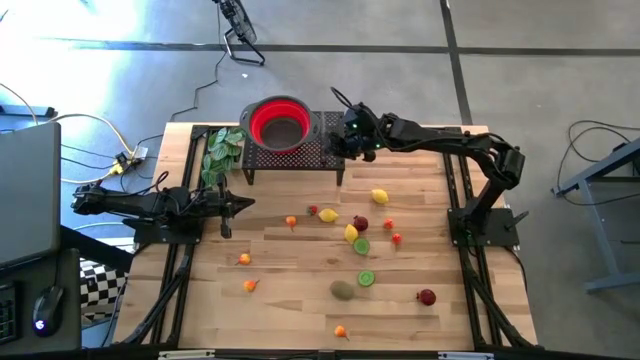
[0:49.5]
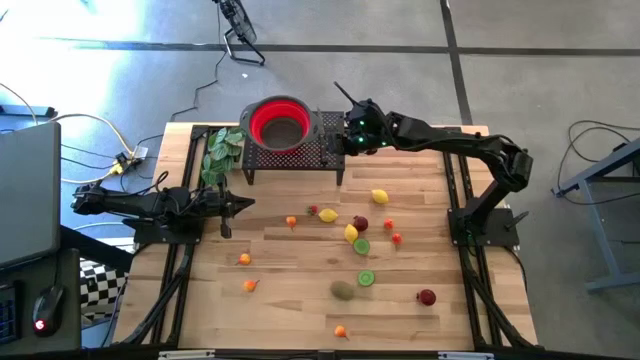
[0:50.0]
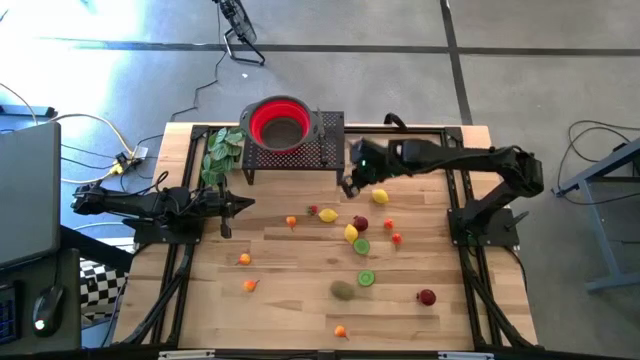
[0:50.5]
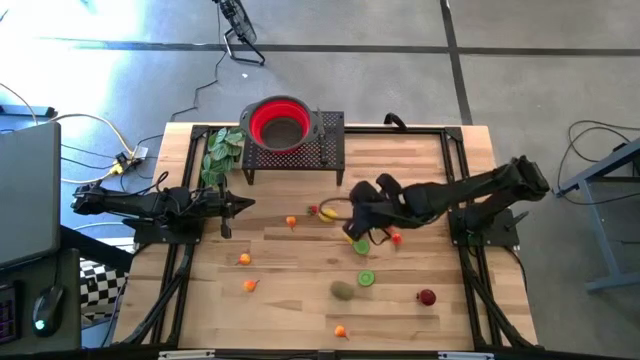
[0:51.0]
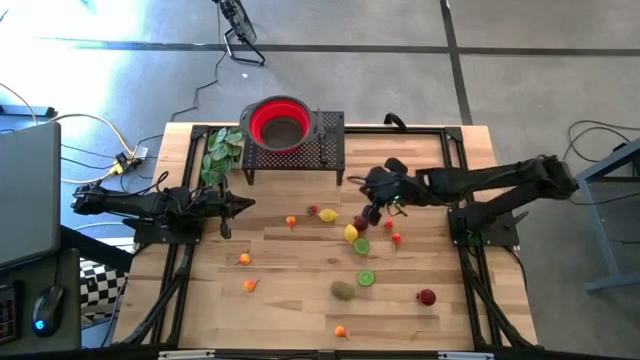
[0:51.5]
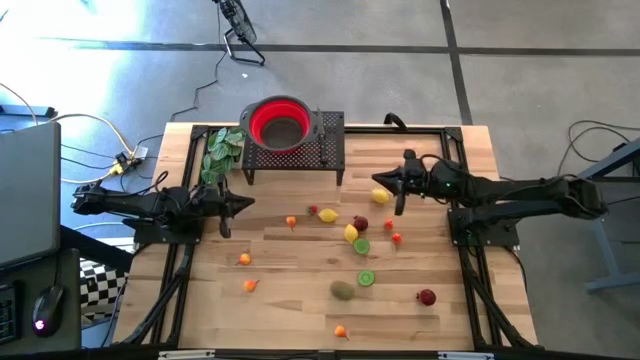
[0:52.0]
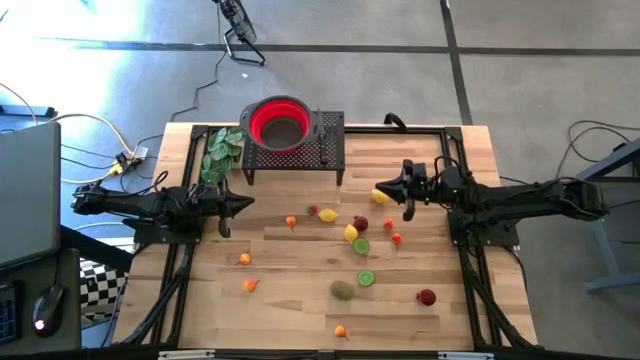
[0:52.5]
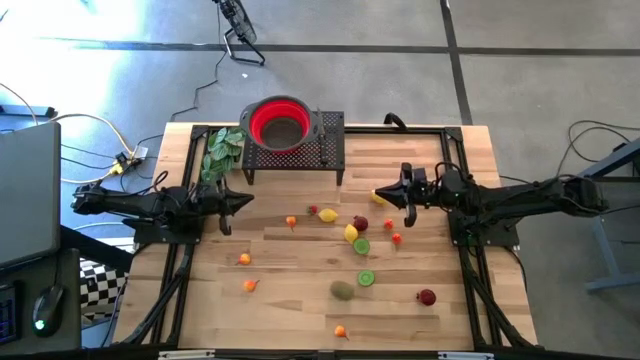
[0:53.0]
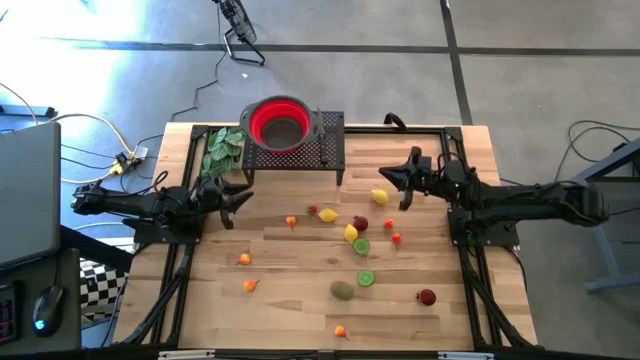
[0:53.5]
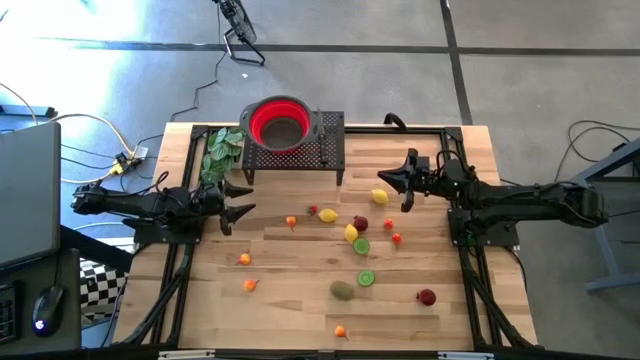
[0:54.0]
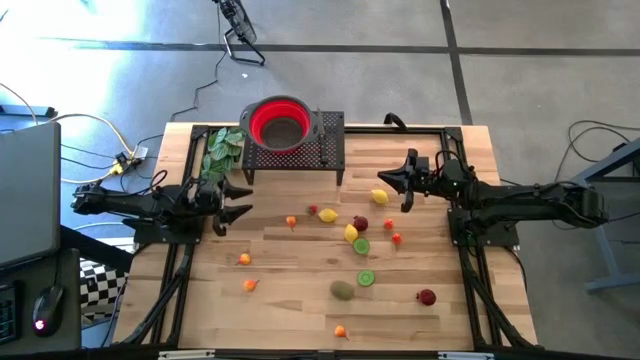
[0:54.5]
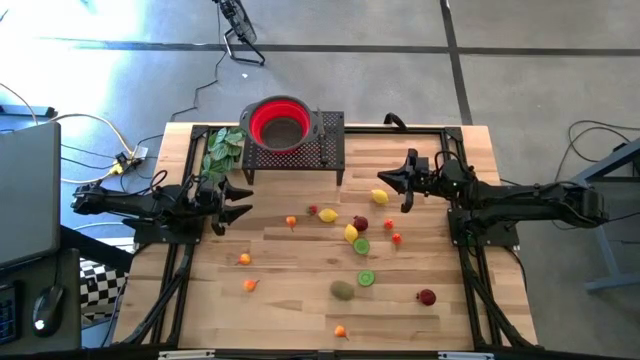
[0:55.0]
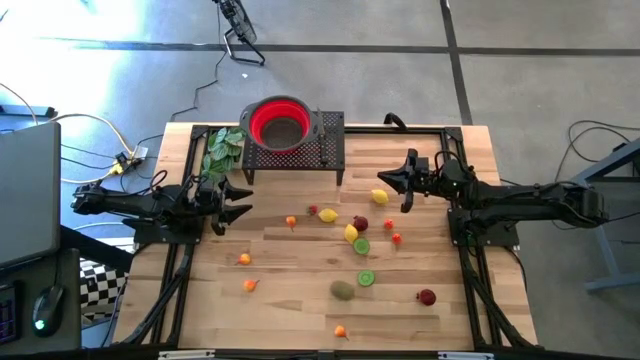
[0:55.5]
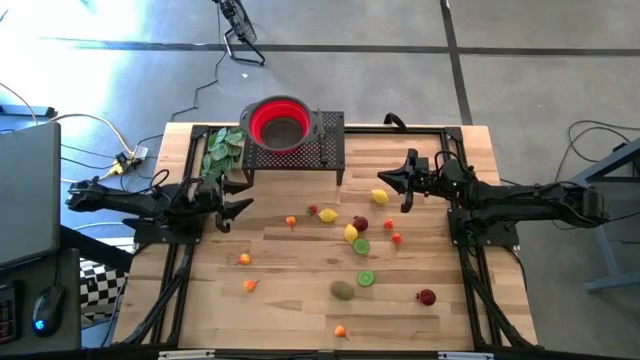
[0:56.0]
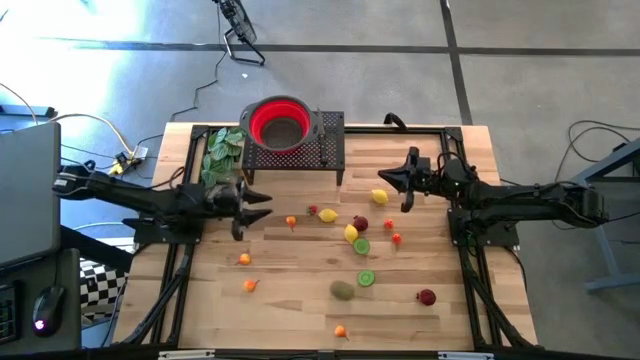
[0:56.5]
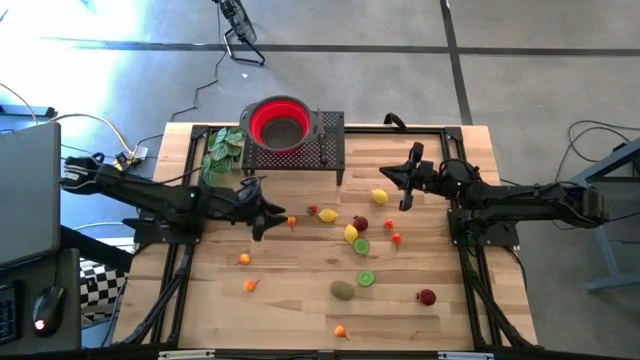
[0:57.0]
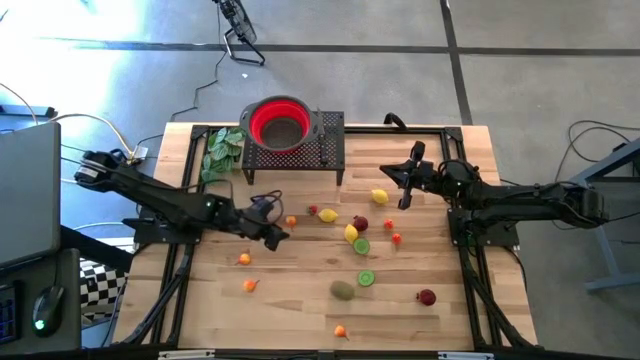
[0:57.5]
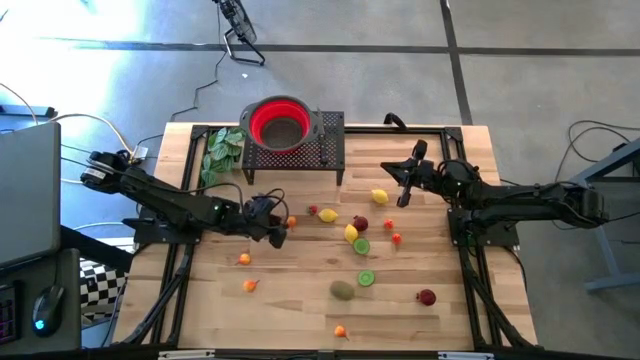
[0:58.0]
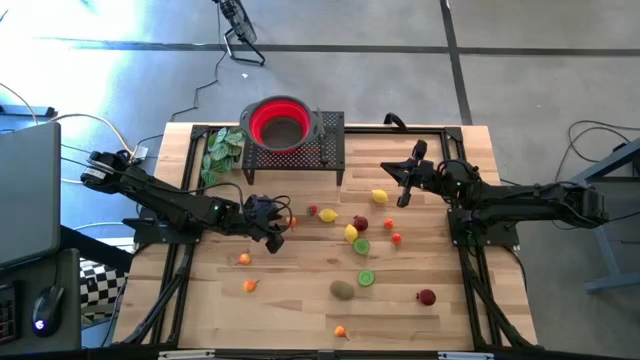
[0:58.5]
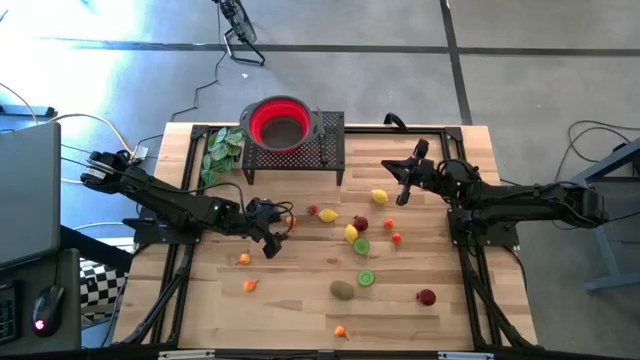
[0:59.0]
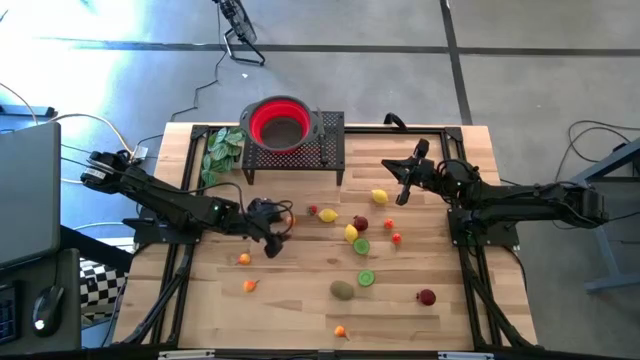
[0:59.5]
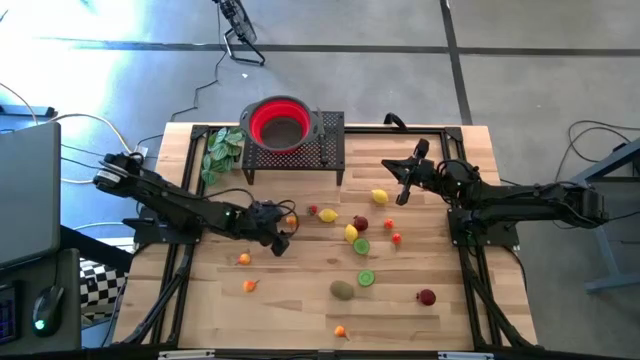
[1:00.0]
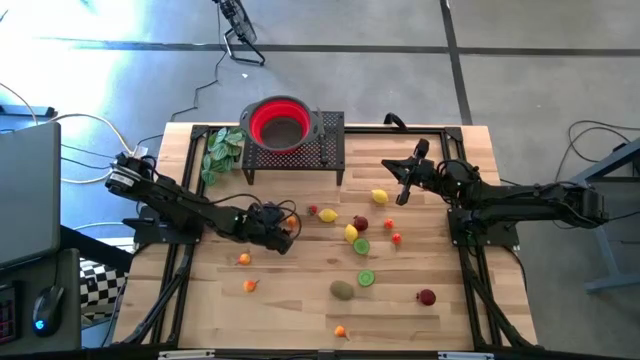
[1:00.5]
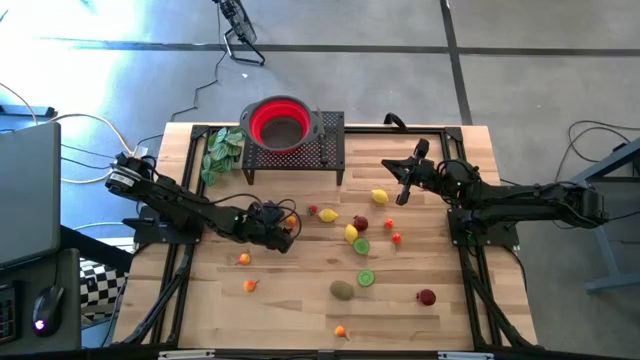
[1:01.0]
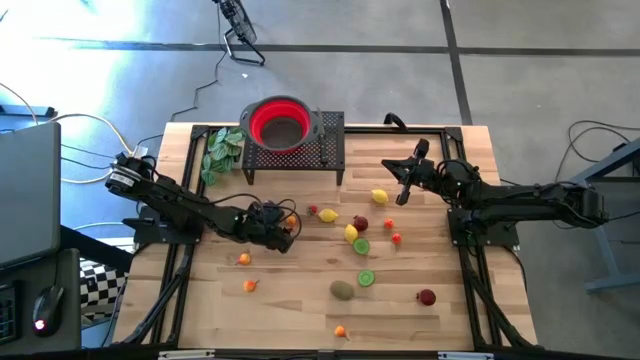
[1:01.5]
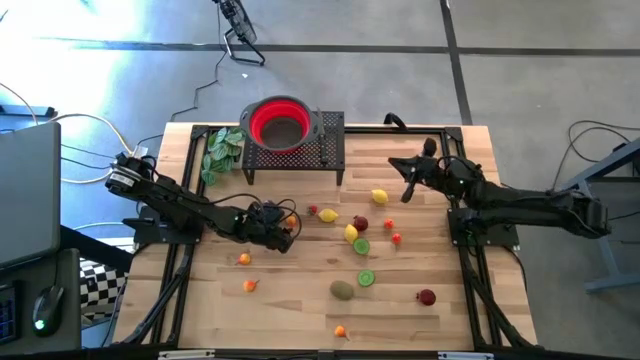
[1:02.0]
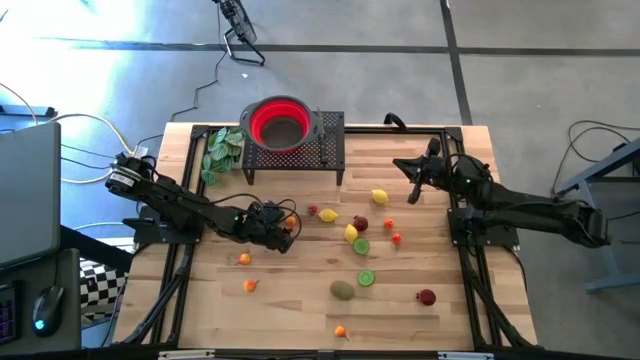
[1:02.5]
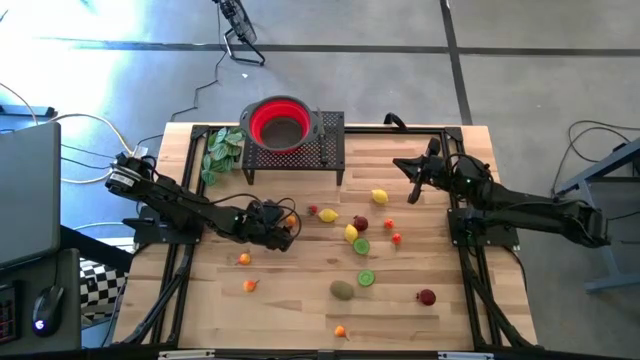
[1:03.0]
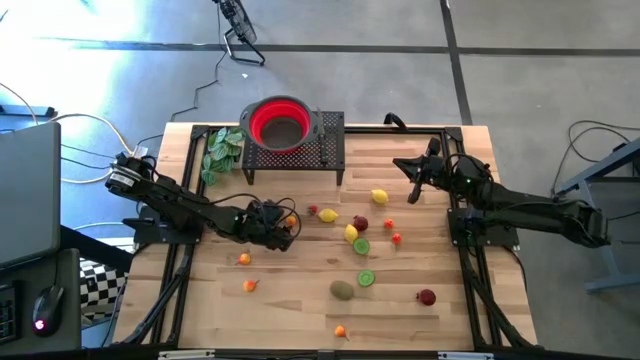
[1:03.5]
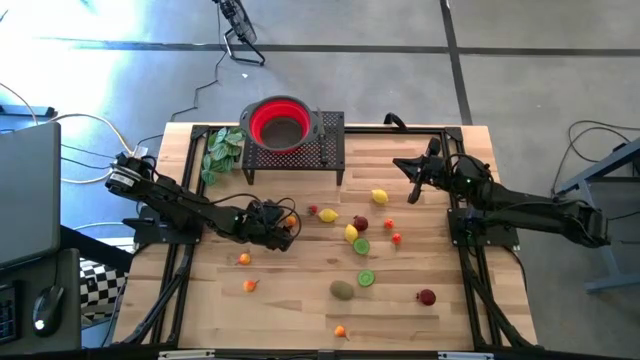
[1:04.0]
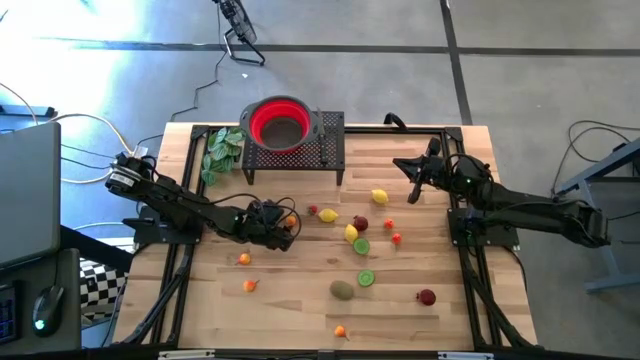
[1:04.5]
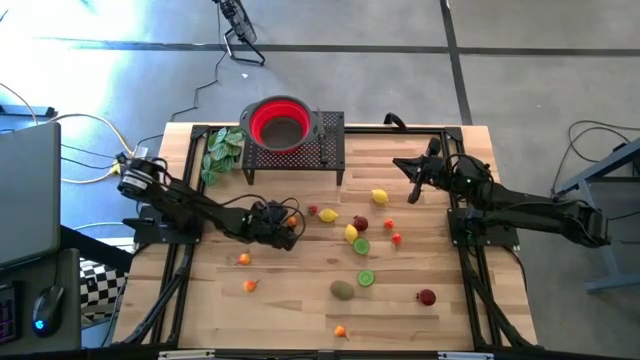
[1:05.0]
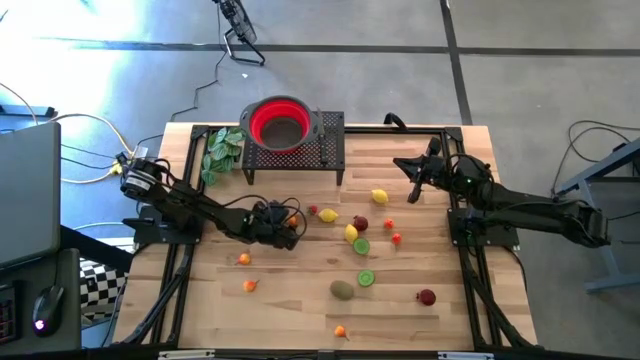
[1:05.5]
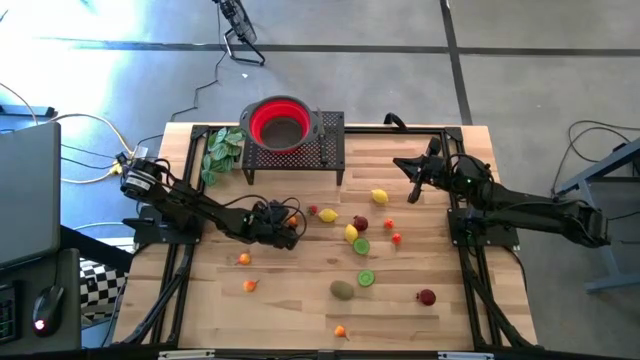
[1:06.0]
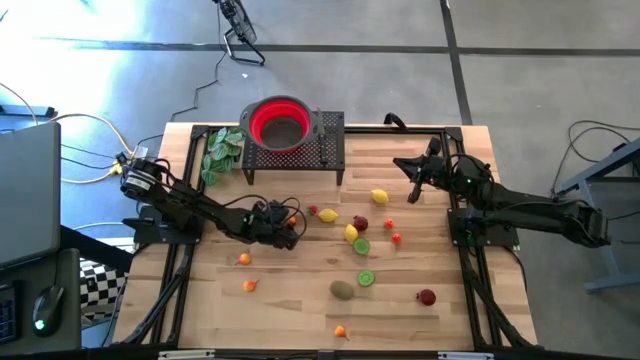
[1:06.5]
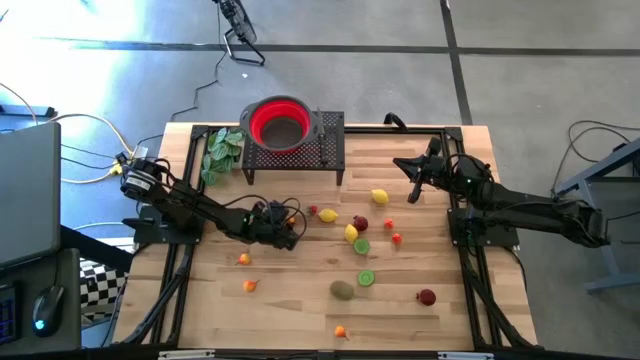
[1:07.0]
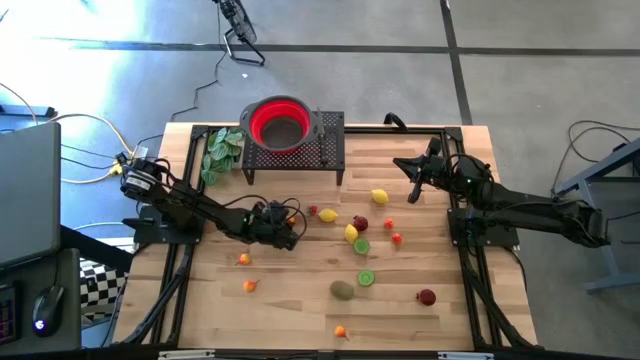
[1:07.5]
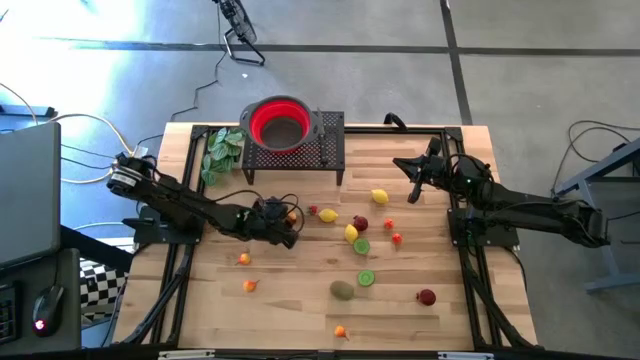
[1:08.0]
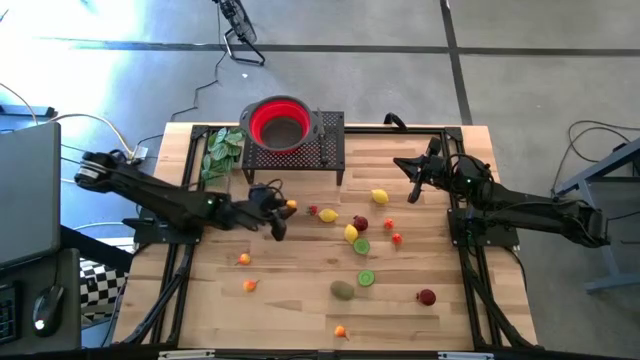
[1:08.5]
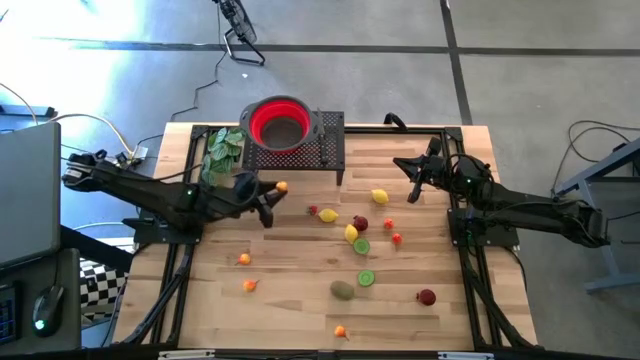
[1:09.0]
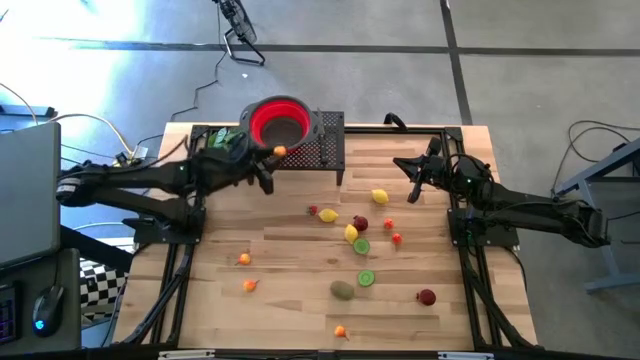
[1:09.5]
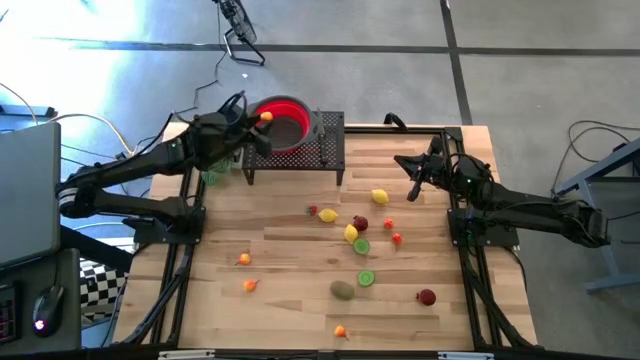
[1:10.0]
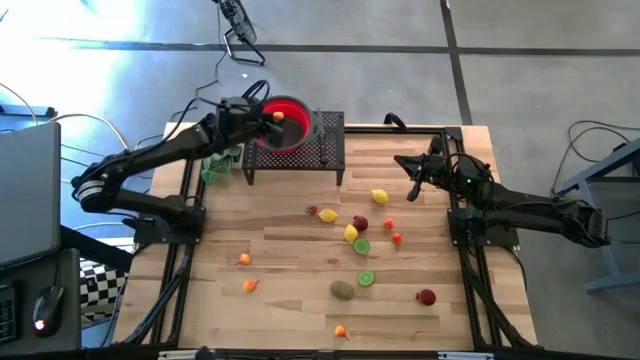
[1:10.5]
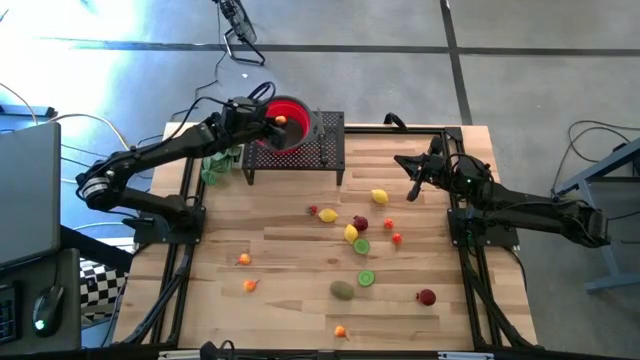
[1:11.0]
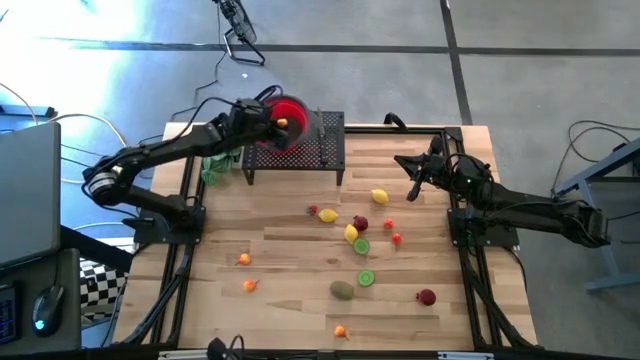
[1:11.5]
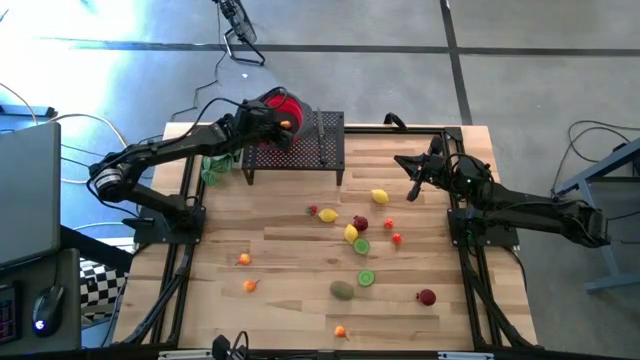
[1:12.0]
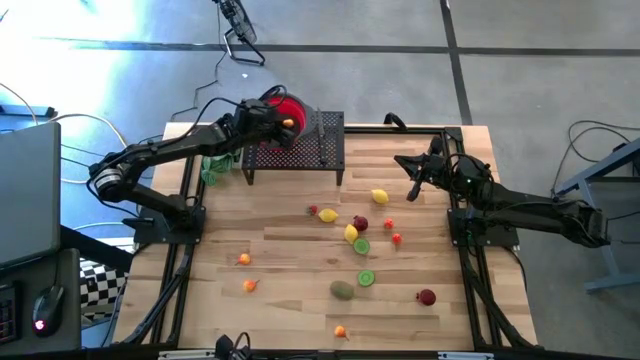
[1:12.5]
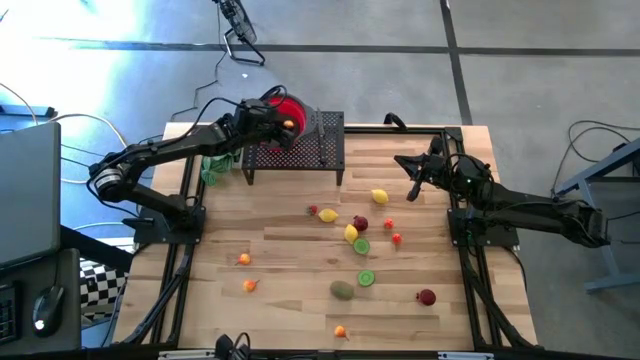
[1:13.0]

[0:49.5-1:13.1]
Task: Pick & Place Fruit
Put the orange pear into the red strainer bowl on the shelf
